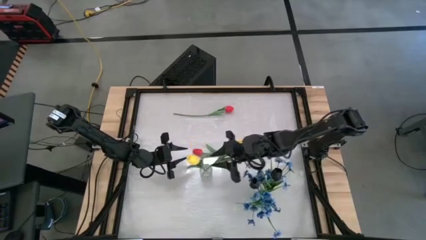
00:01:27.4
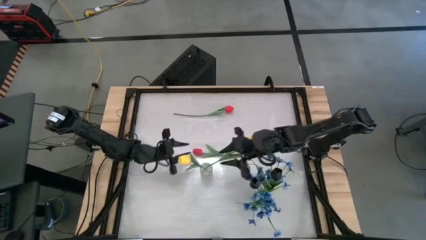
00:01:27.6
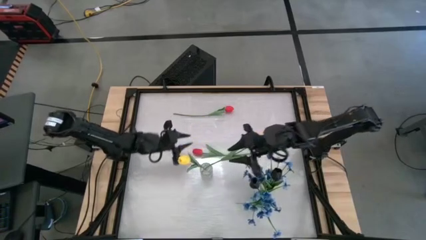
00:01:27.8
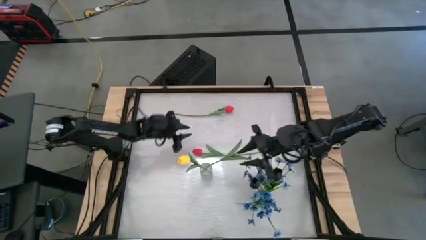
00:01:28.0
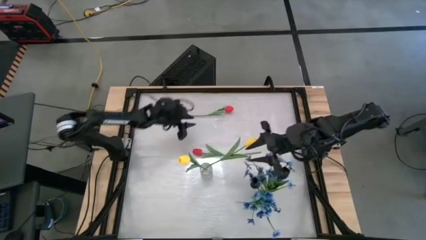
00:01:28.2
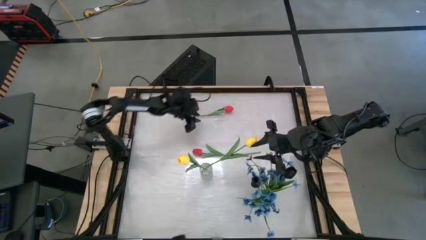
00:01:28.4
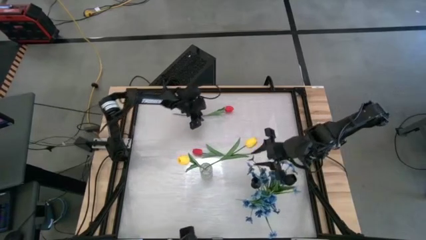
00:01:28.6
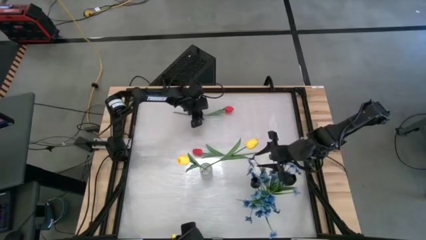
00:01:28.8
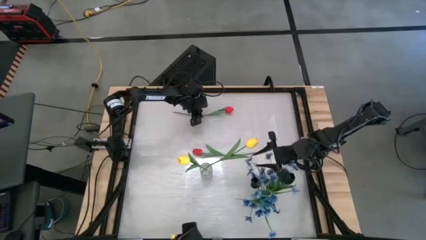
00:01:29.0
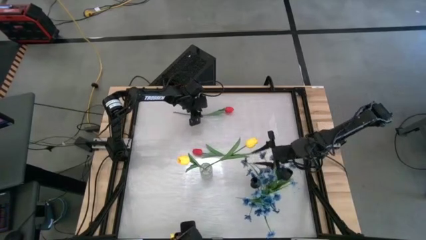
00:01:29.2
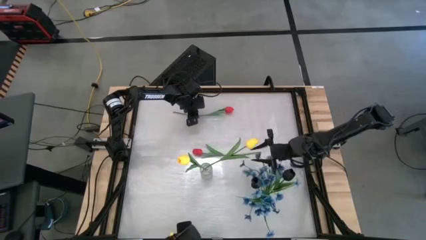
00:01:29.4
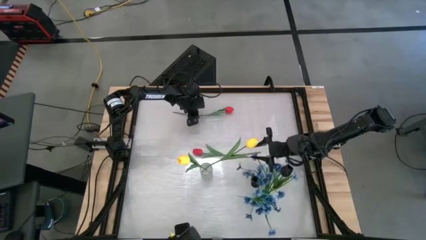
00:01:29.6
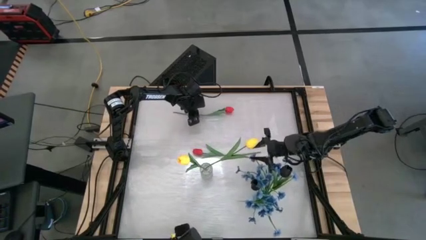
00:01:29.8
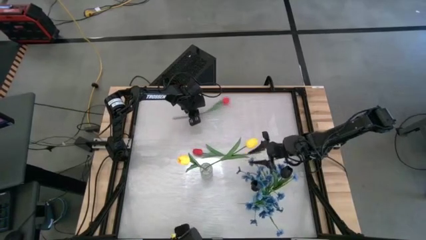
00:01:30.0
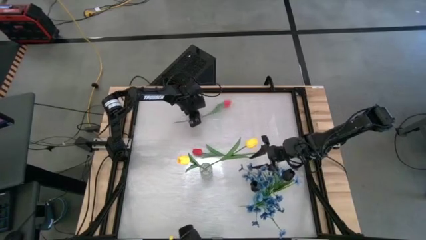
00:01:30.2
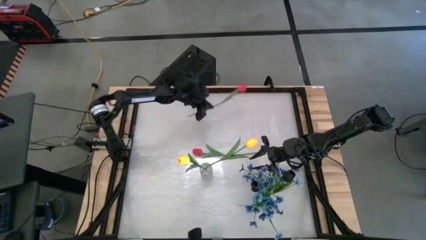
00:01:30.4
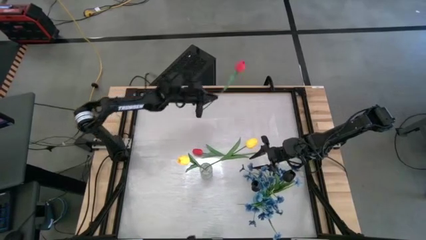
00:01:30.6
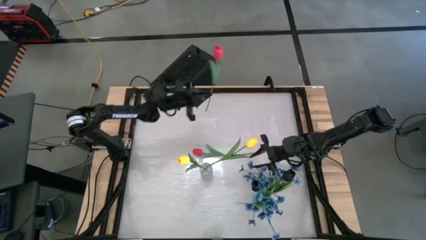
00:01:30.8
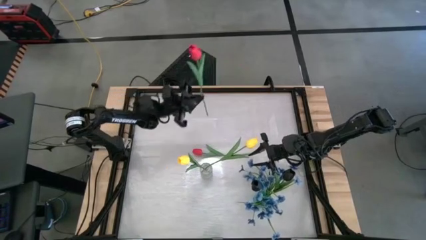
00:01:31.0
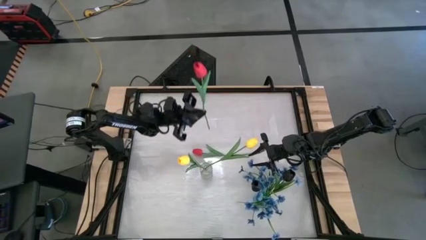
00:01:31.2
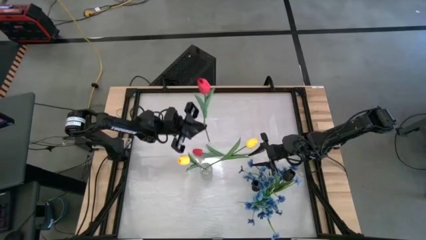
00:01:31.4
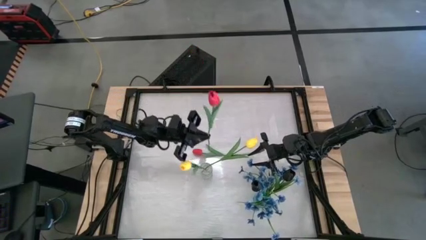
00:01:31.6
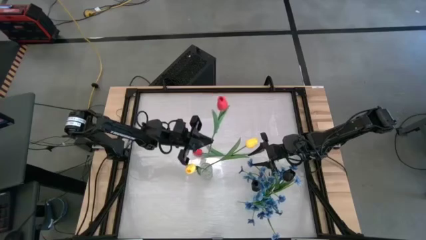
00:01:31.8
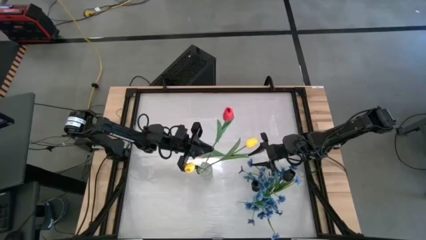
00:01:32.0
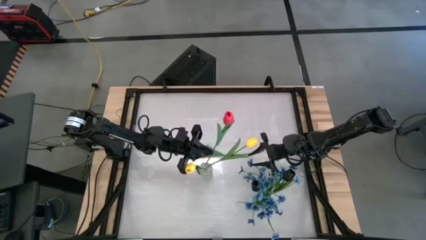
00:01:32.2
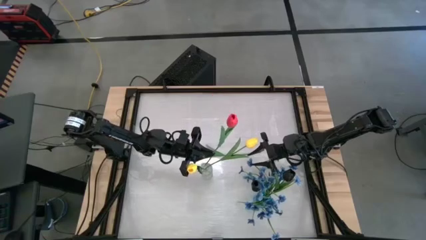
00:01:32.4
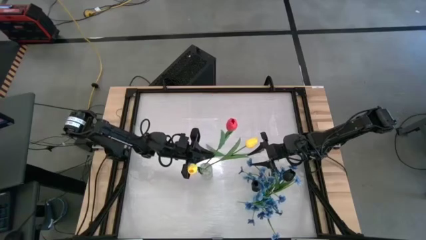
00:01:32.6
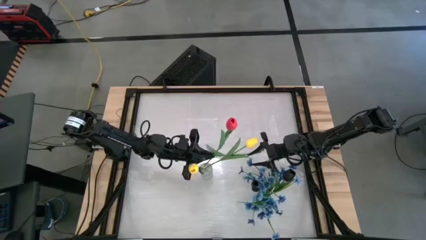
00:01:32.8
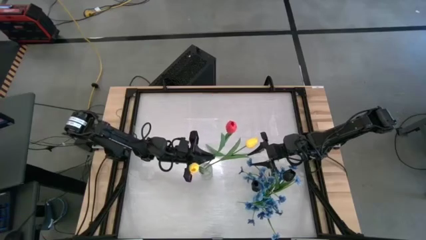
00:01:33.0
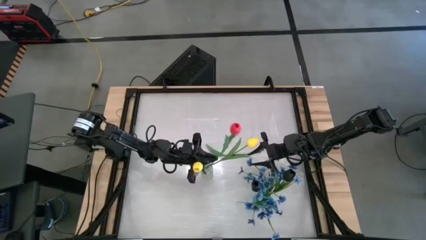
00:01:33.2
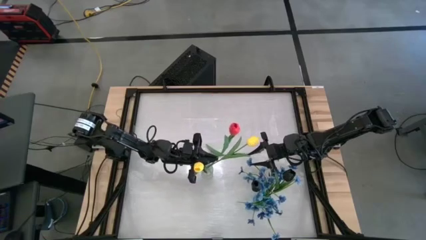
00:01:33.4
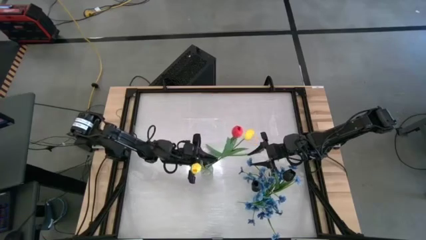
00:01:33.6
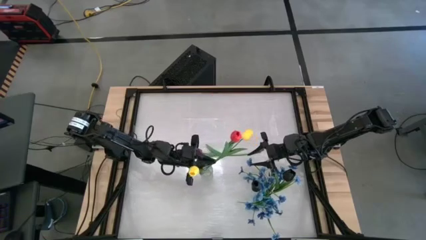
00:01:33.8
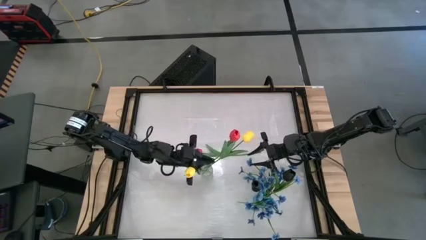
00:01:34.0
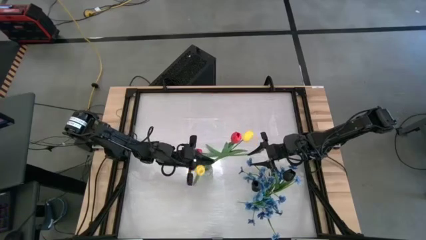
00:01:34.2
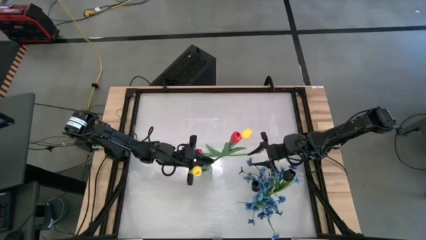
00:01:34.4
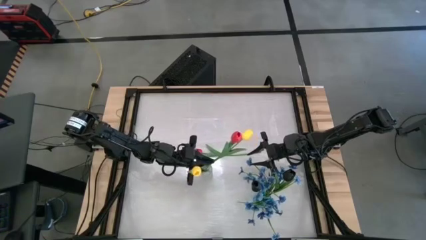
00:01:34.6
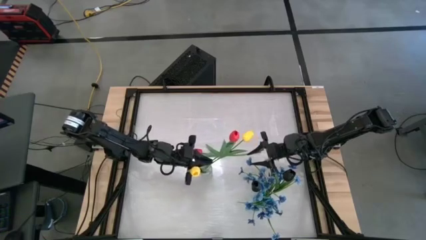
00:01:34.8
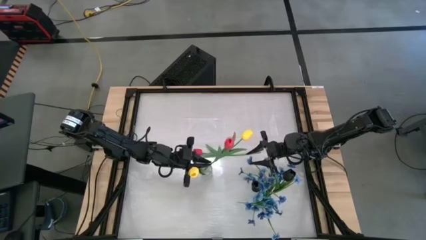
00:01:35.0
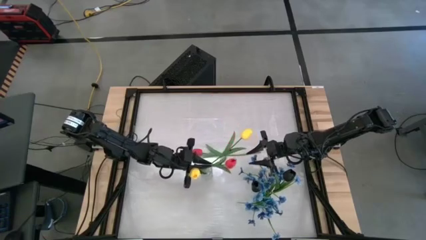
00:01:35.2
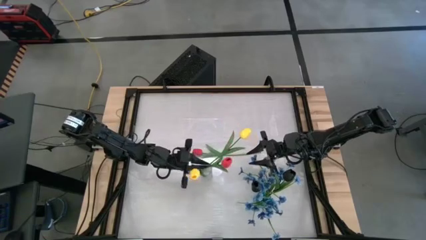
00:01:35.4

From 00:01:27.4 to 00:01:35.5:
Task: Sort flowers into vase by color
Put the top red flower into the transparent vase

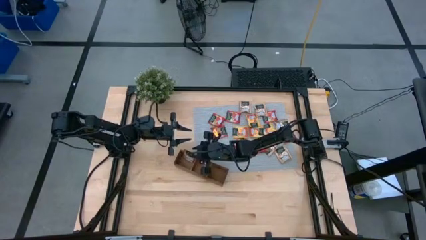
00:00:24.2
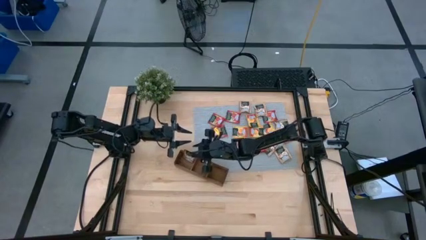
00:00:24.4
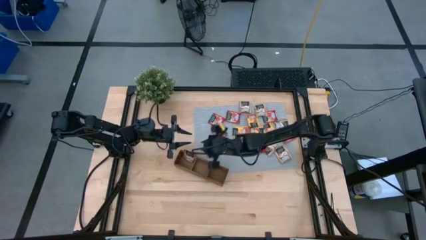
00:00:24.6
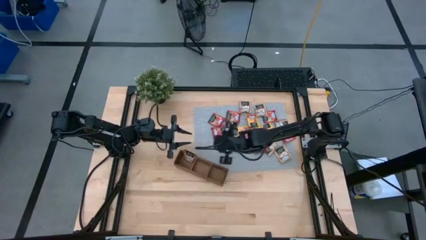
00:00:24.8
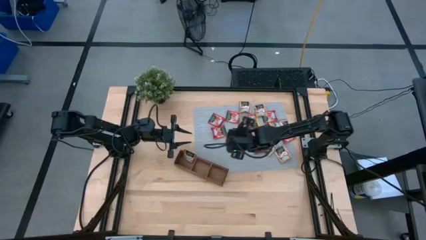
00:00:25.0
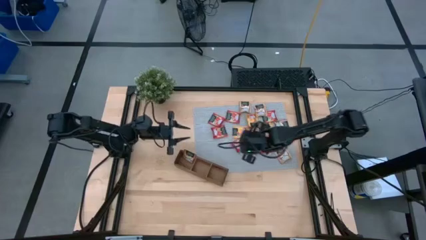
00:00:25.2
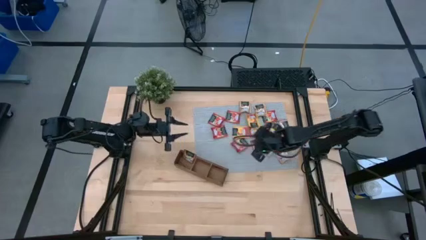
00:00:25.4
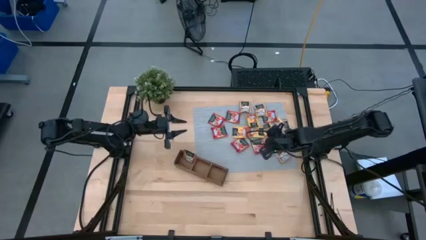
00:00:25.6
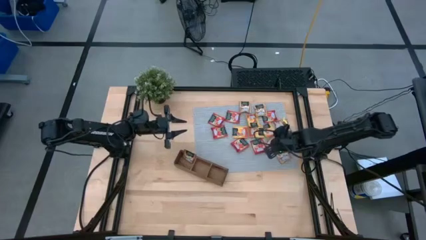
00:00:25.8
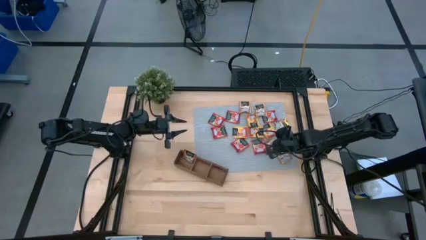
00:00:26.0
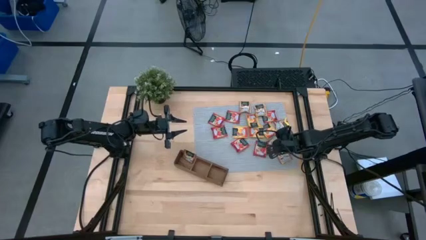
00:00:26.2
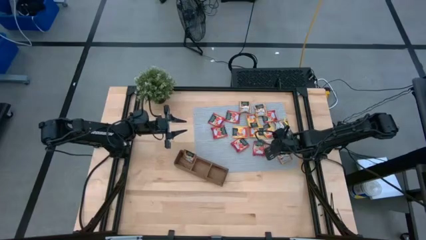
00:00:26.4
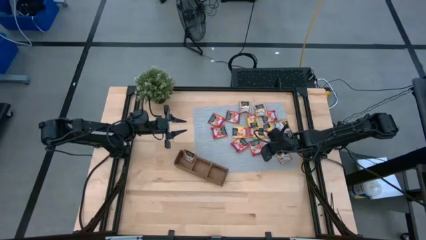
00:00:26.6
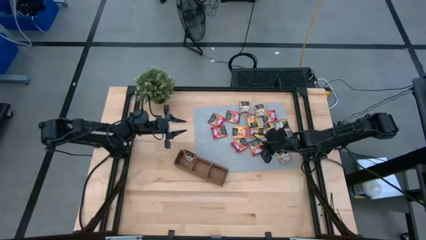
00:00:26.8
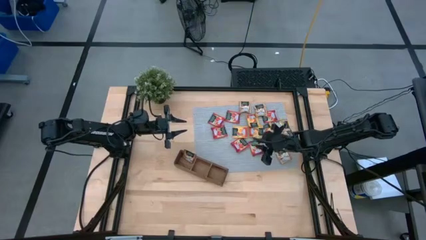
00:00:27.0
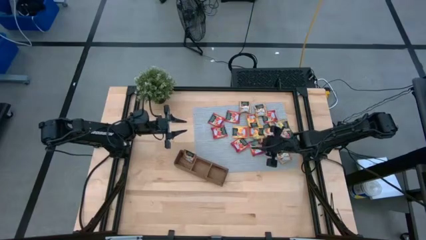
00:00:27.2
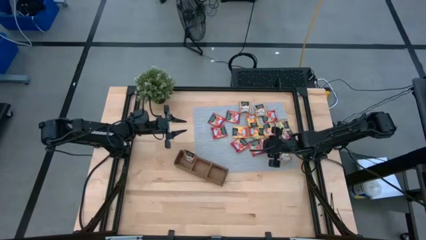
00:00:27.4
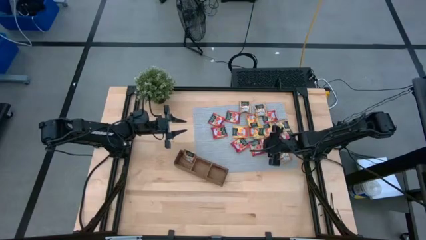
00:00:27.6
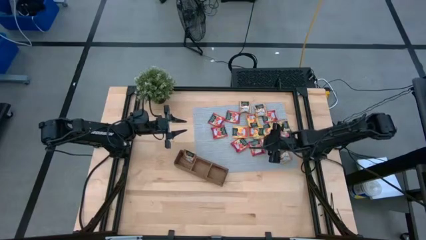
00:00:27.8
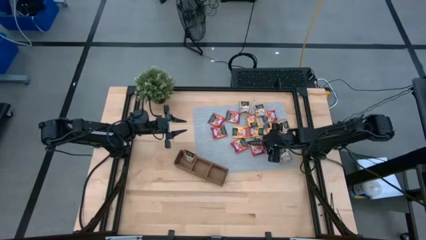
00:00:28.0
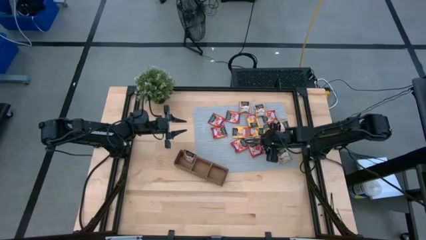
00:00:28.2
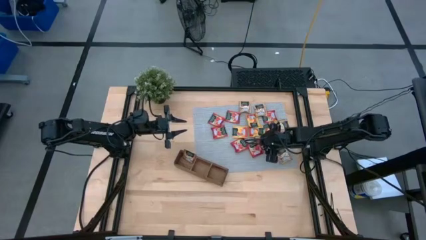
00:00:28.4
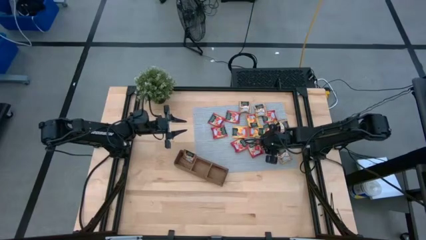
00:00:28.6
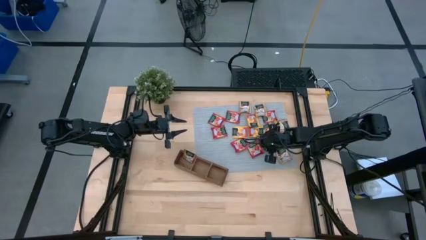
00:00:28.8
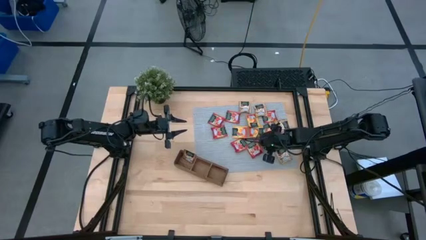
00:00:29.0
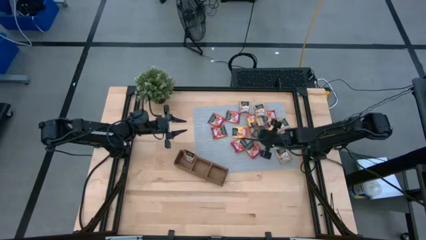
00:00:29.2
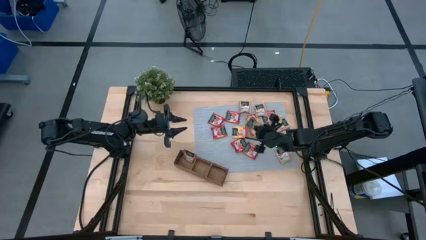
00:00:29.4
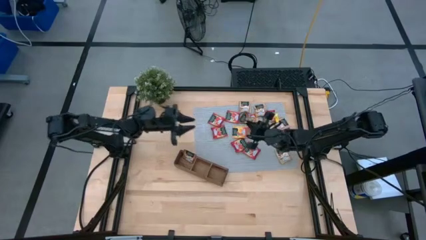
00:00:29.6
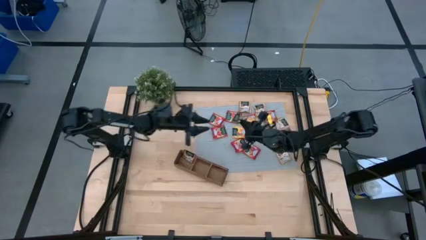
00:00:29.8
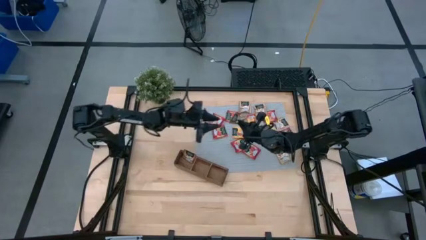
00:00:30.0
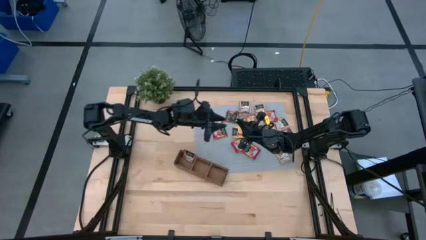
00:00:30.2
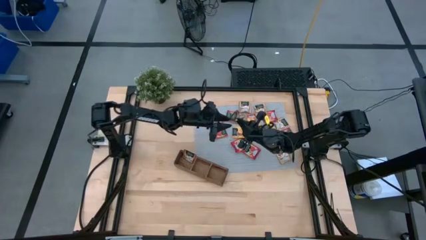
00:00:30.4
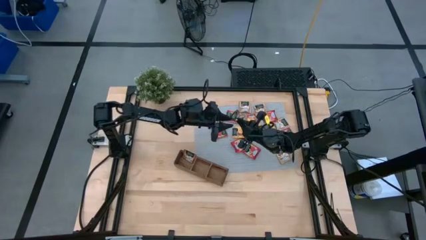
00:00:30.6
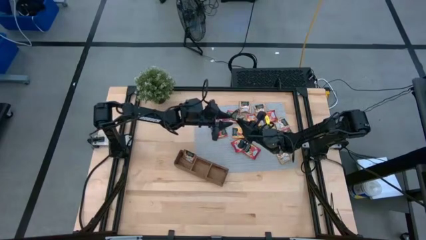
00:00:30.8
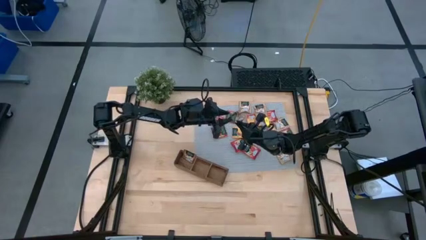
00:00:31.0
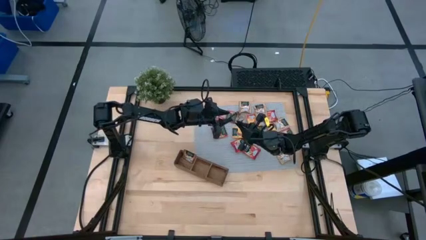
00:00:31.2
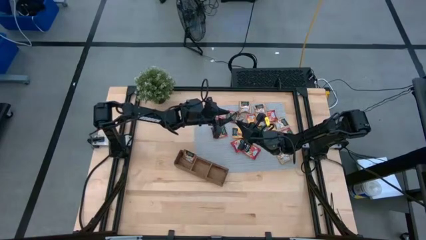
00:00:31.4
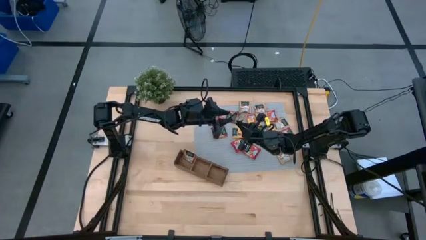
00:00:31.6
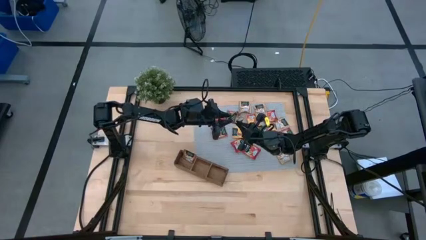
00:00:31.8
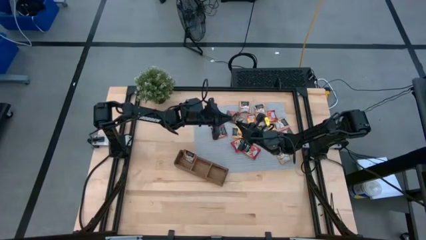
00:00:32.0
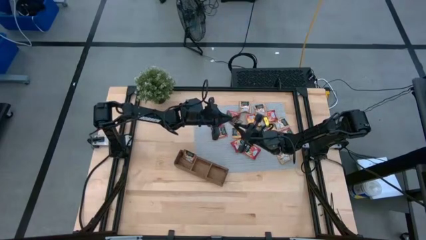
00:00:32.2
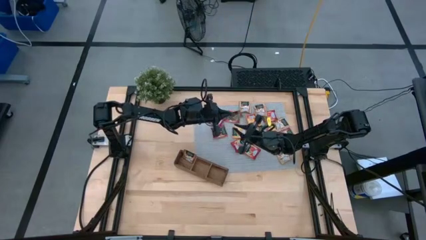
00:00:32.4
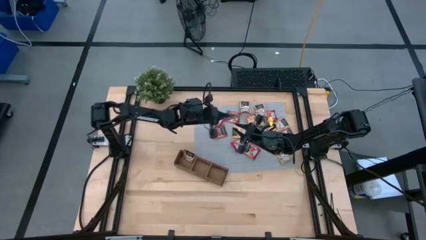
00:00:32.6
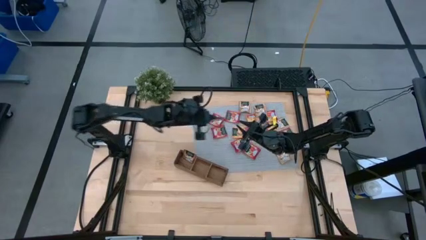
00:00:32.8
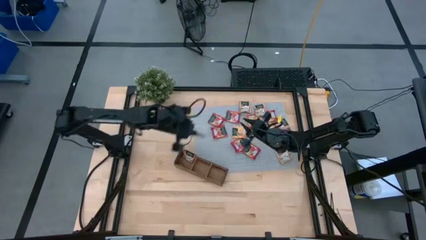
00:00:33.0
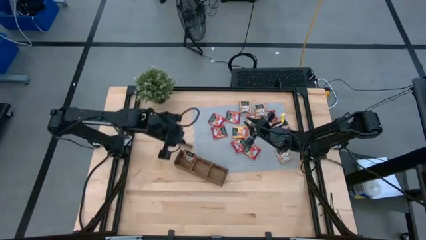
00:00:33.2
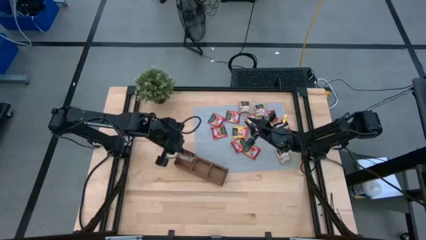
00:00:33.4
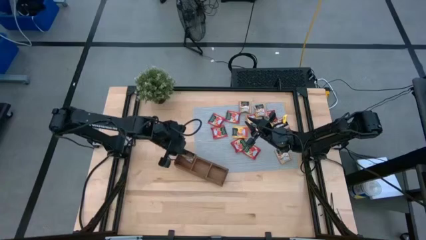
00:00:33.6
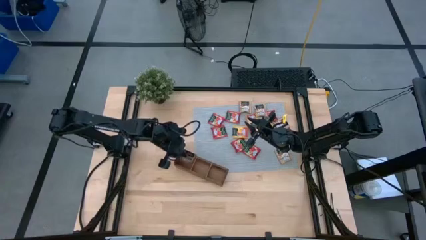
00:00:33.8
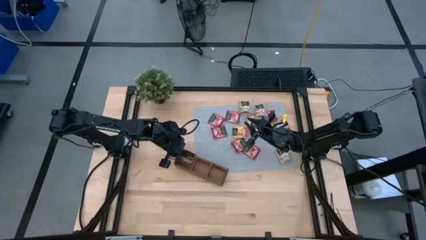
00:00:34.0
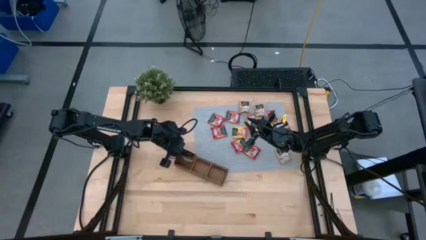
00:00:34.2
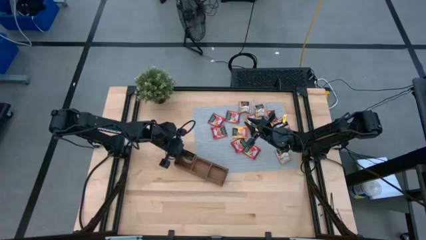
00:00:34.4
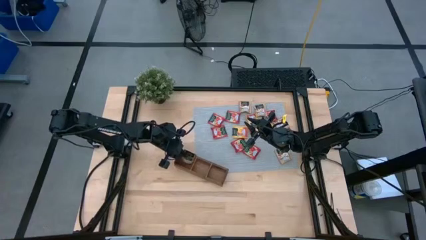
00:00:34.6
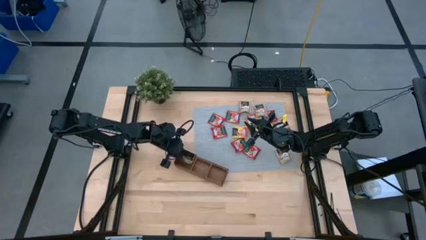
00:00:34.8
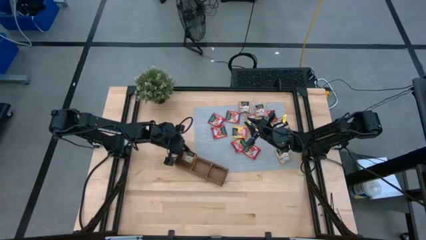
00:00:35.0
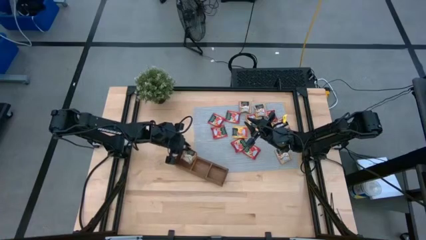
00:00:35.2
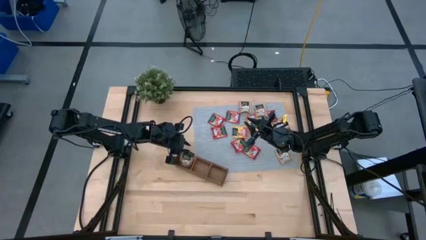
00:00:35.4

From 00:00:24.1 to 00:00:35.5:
Task: Pick & Place Tea
Put the brown tea bag into the left section of the wooden organizer
